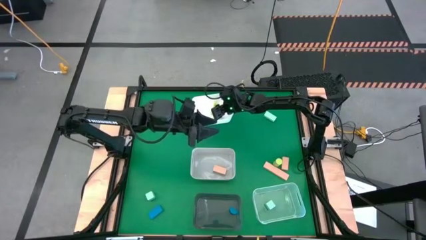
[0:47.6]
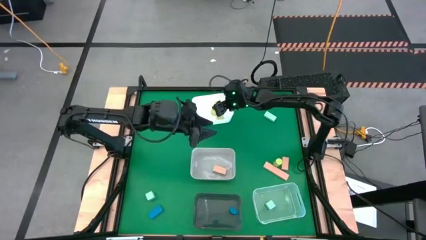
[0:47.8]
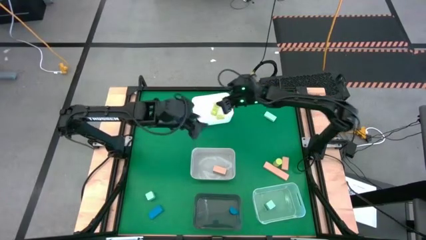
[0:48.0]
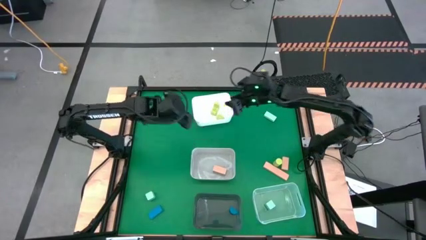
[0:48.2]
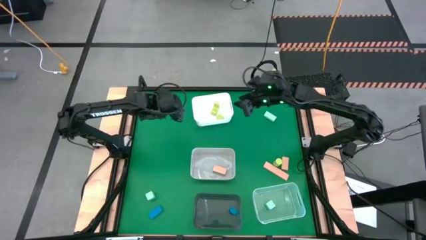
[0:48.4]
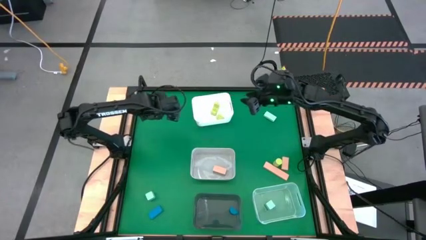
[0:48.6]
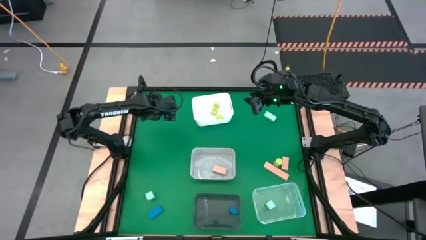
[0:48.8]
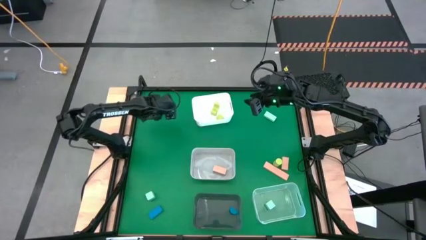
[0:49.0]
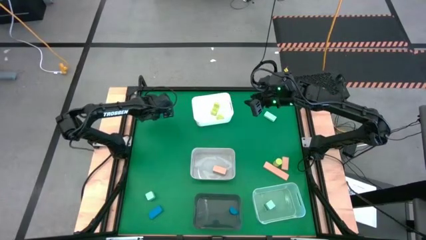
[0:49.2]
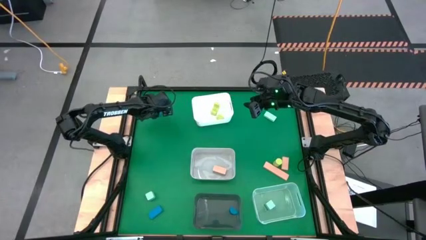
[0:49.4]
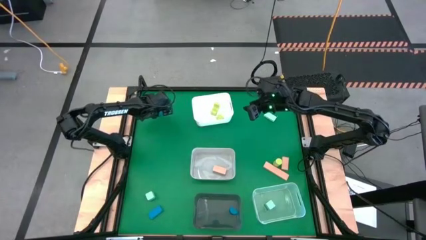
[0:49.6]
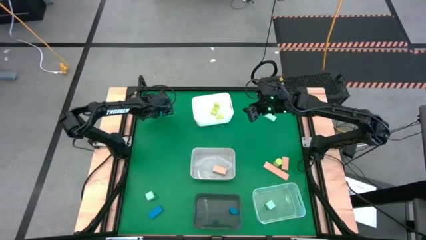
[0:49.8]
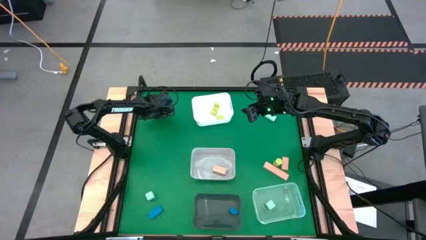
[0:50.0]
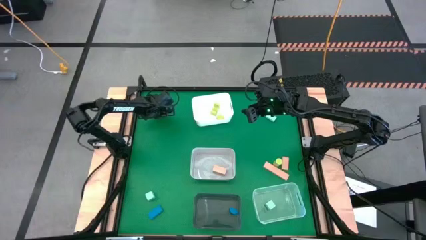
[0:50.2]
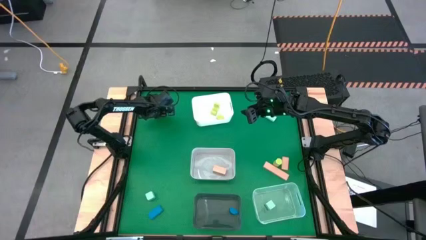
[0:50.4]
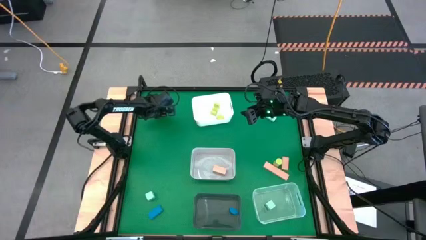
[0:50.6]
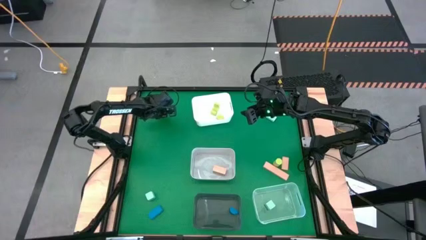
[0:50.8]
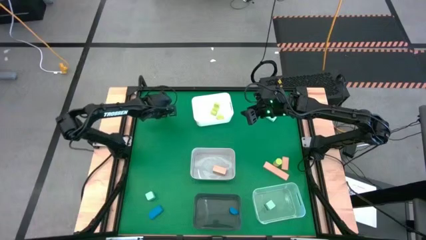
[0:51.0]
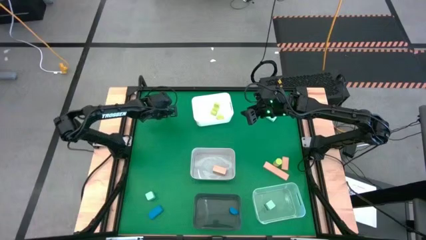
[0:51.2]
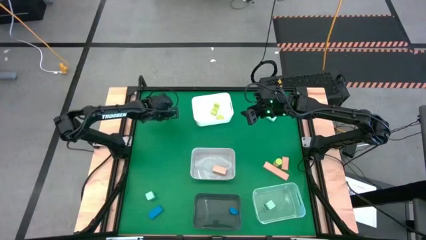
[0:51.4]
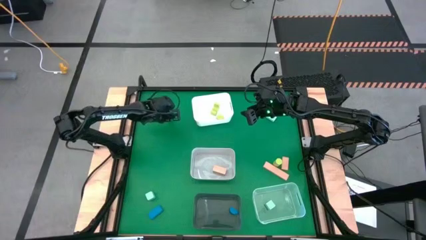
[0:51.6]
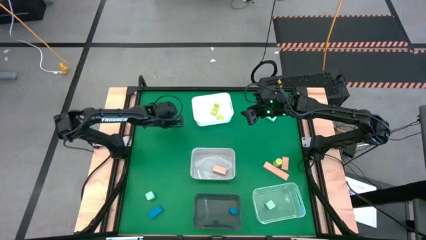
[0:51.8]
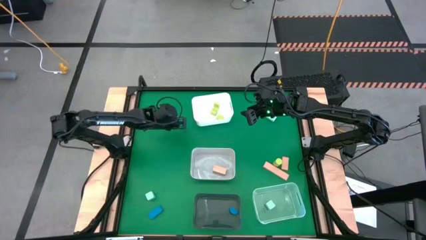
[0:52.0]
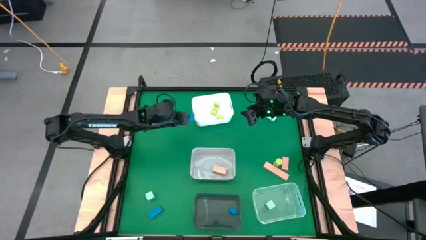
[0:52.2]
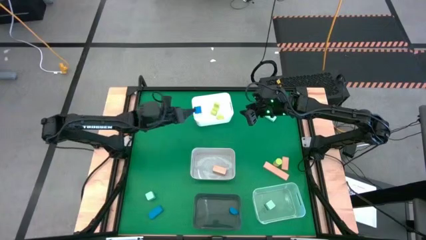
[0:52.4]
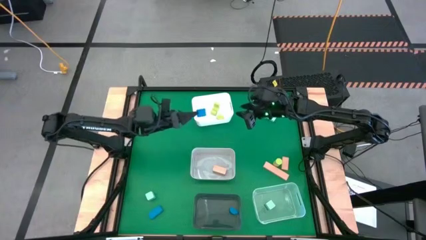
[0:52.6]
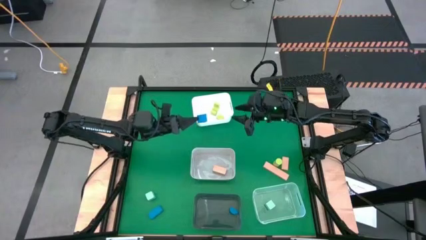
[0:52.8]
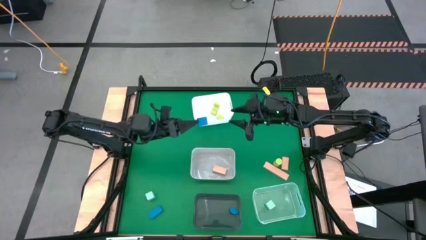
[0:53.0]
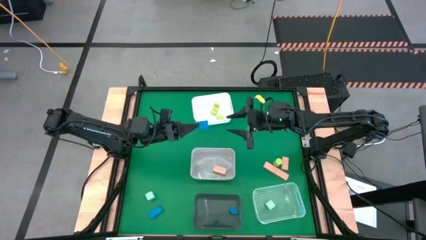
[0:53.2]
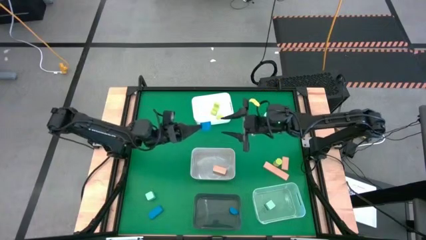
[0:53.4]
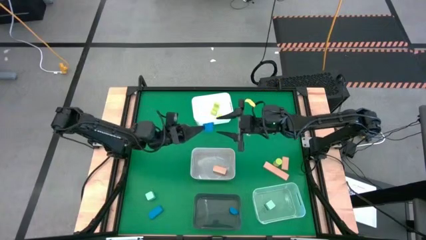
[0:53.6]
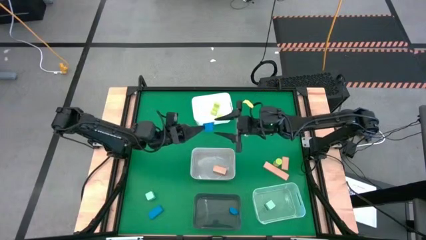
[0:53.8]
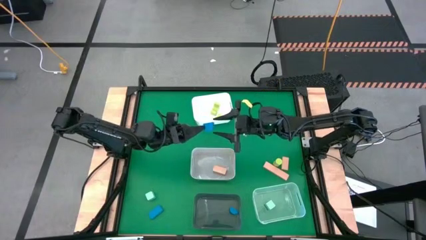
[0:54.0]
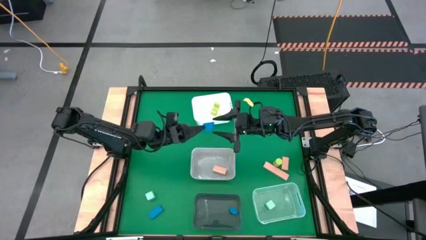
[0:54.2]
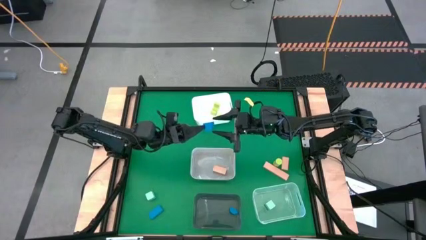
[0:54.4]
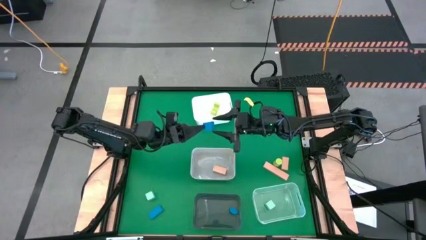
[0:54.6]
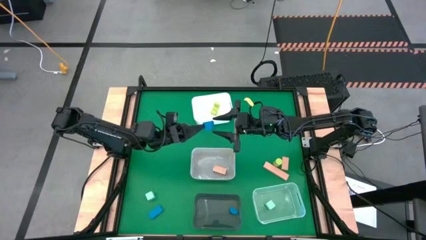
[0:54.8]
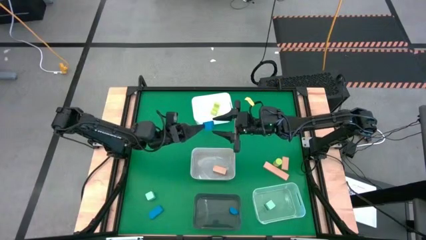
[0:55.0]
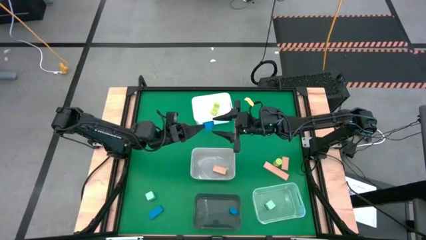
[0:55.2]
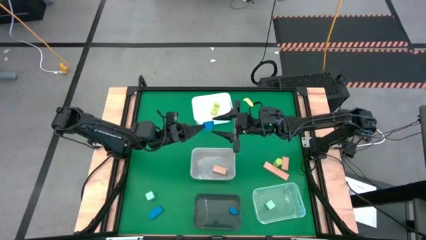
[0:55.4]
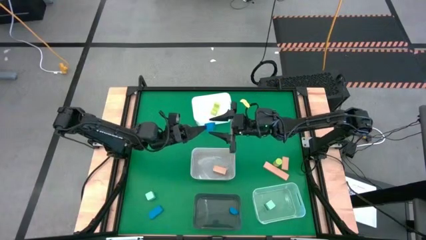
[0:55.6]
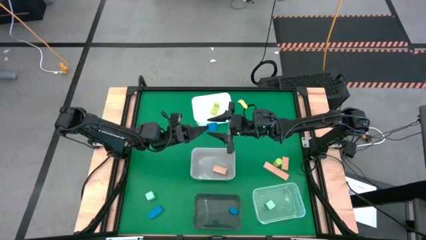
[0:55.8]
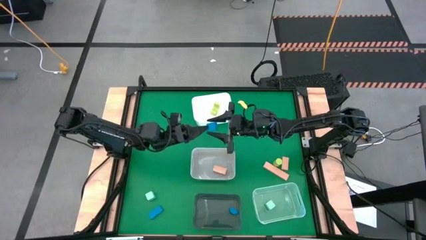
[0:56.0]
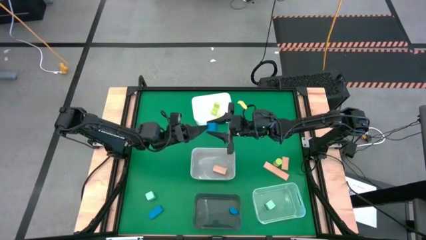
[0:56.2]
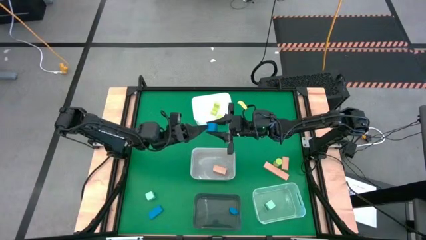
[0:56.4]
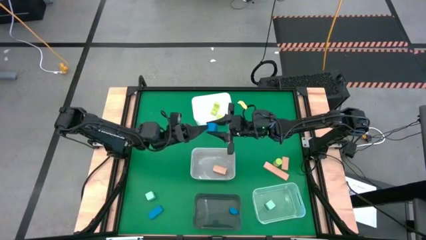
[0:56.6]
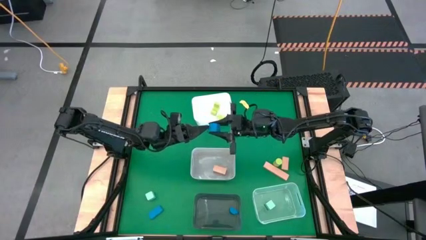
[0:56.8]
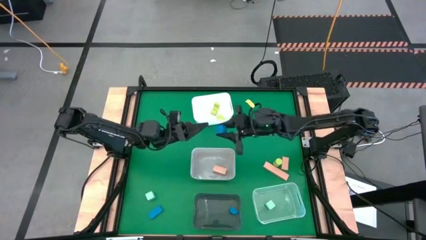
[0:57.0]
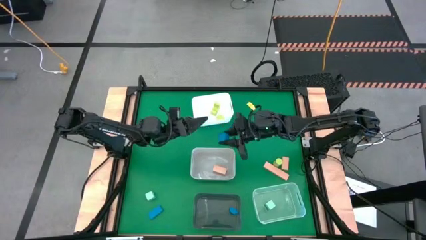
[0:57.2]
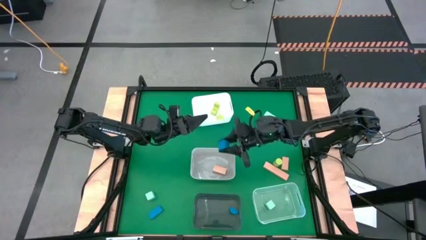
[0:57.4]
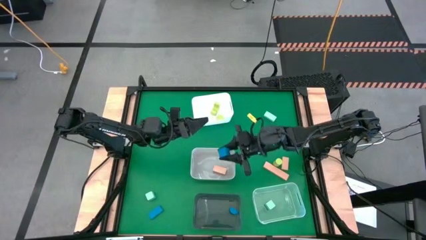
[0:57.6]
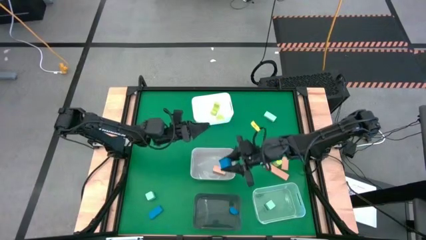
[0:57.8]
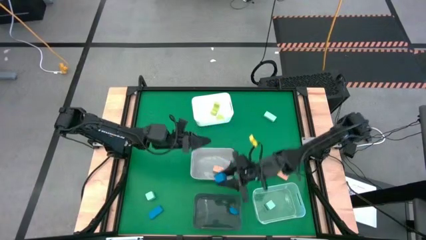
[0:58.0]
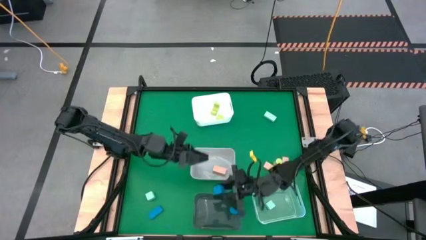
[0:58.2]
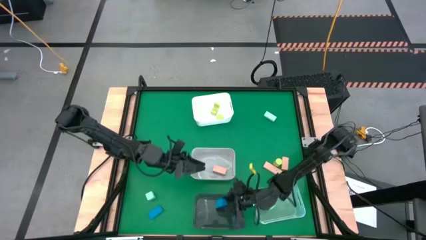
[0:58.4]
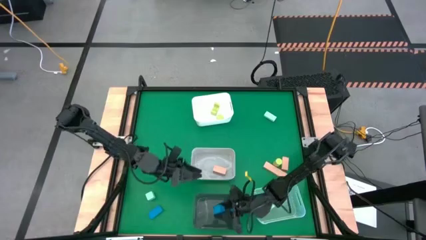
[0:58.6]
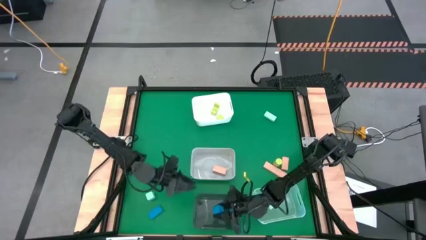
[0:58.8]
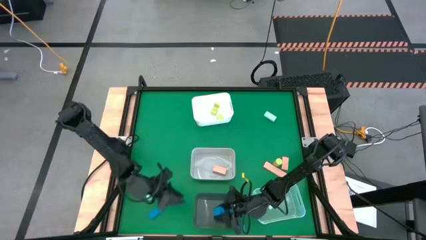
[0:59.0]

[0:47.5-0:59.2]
Task: Sort & place blocks by color
Put the top blue block into the black bin
